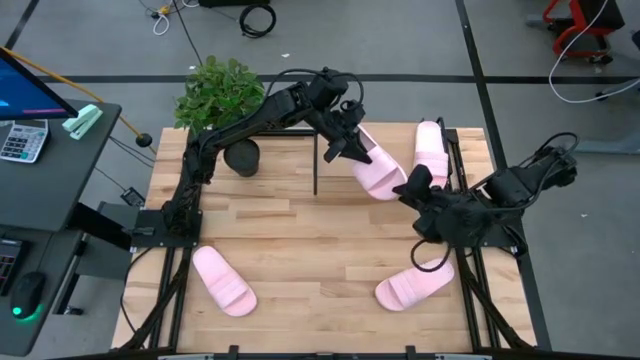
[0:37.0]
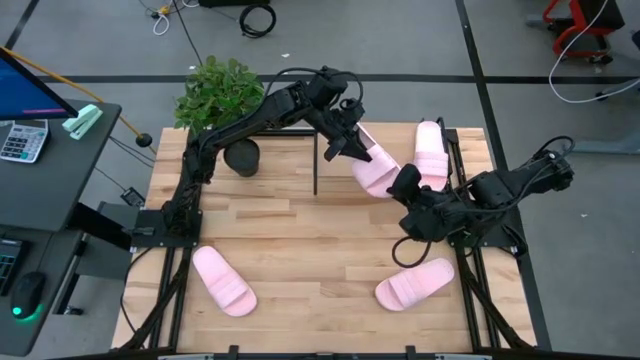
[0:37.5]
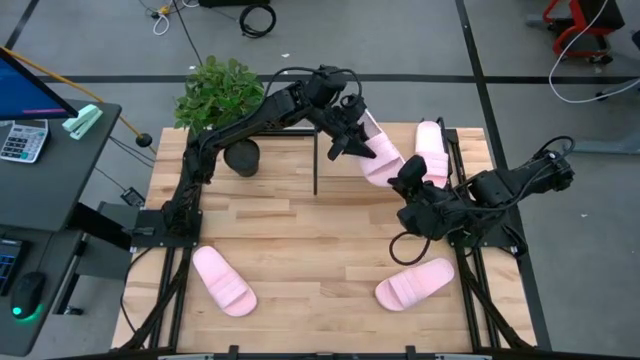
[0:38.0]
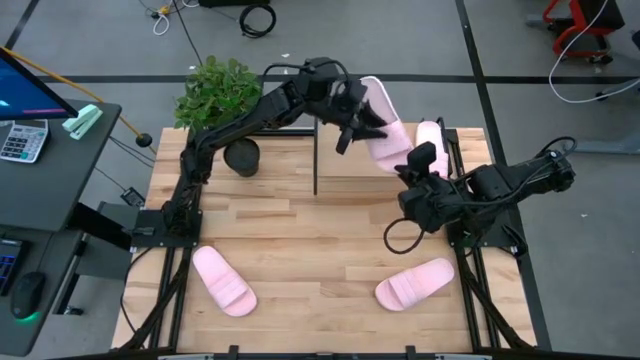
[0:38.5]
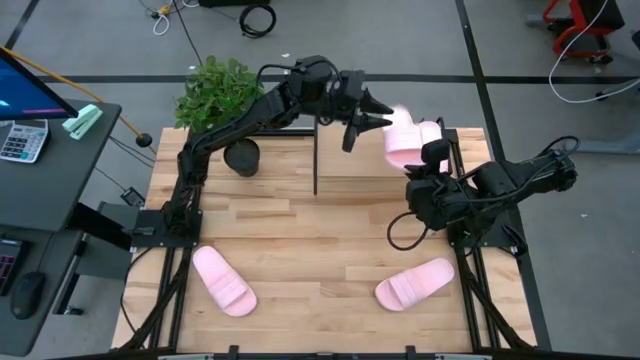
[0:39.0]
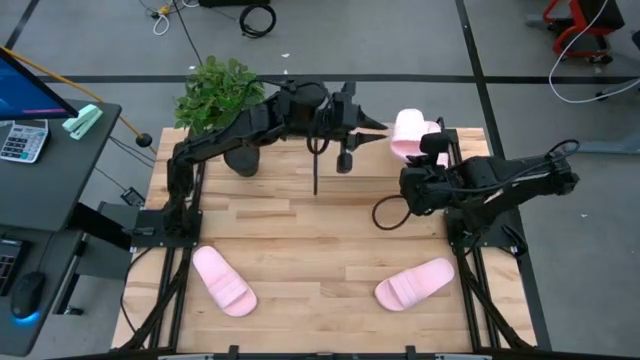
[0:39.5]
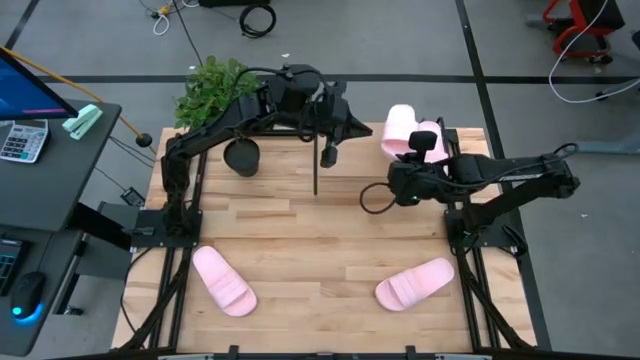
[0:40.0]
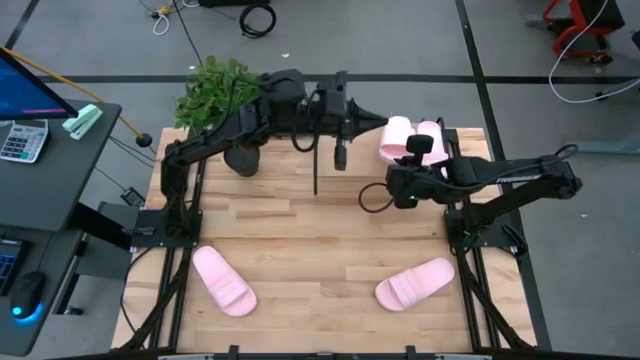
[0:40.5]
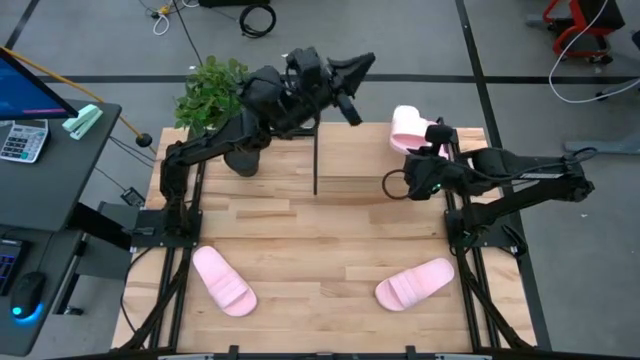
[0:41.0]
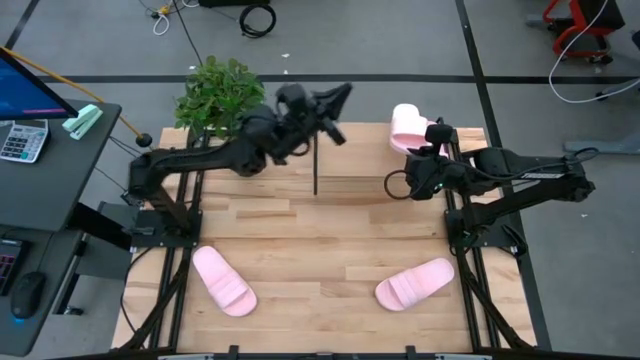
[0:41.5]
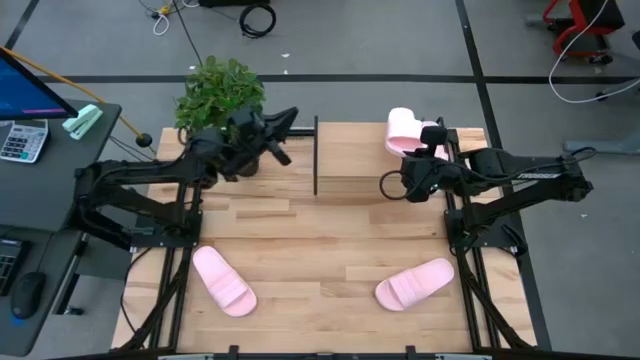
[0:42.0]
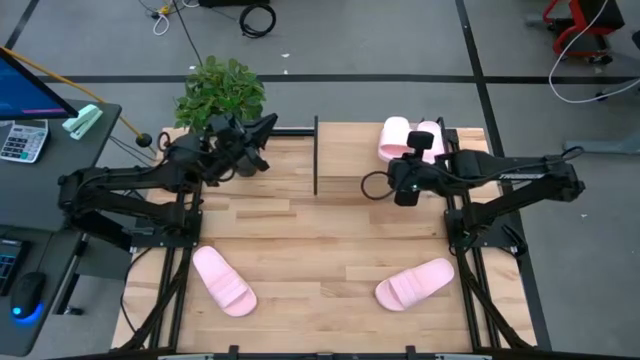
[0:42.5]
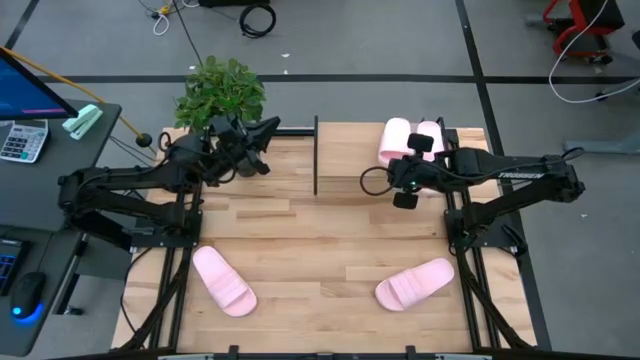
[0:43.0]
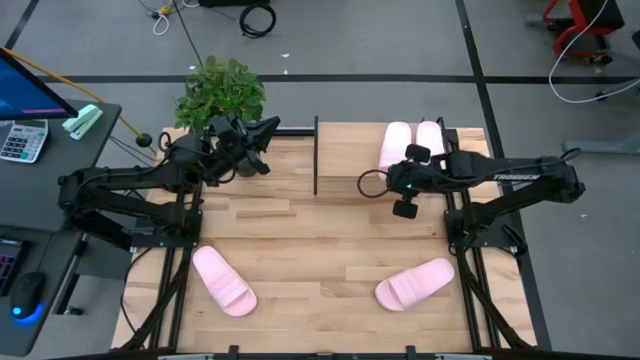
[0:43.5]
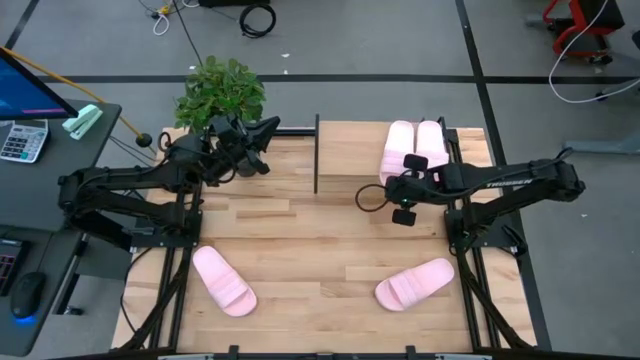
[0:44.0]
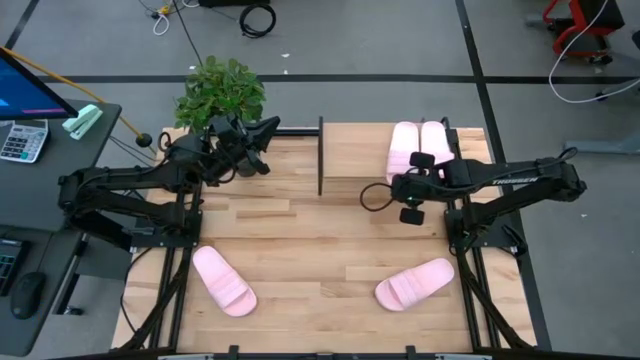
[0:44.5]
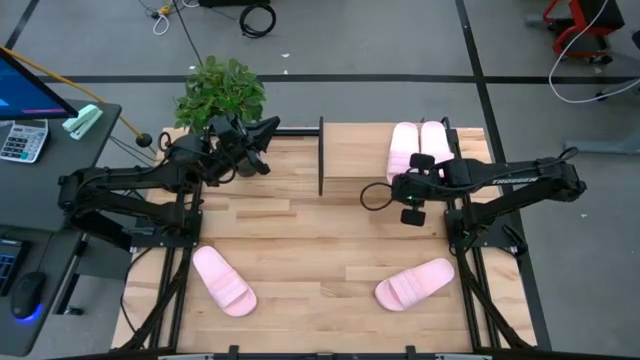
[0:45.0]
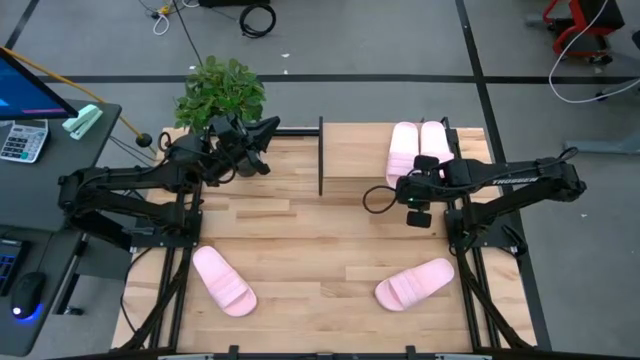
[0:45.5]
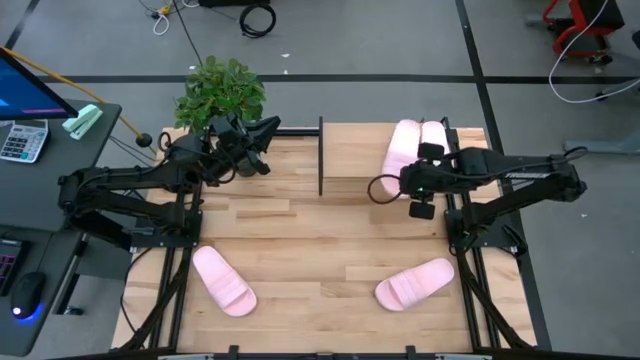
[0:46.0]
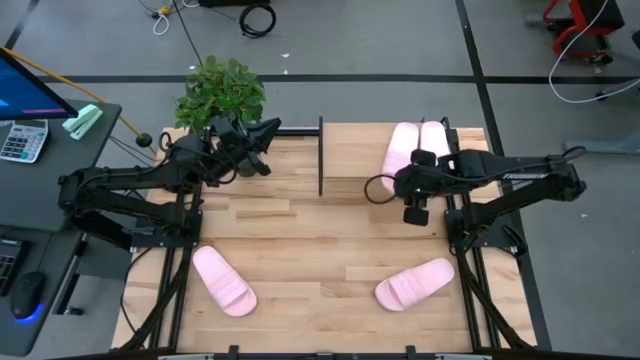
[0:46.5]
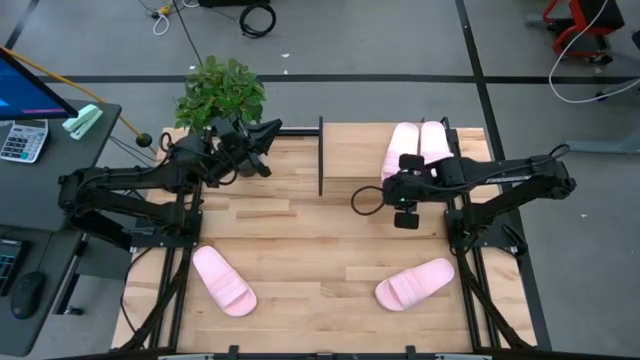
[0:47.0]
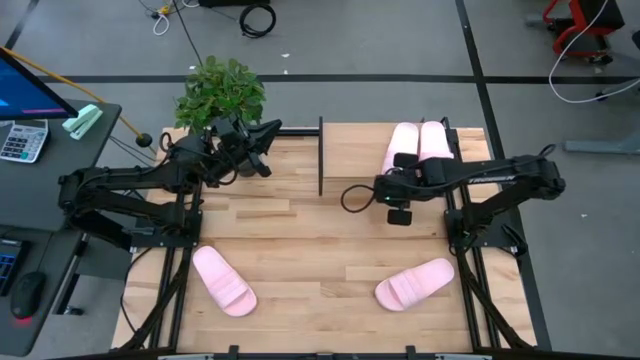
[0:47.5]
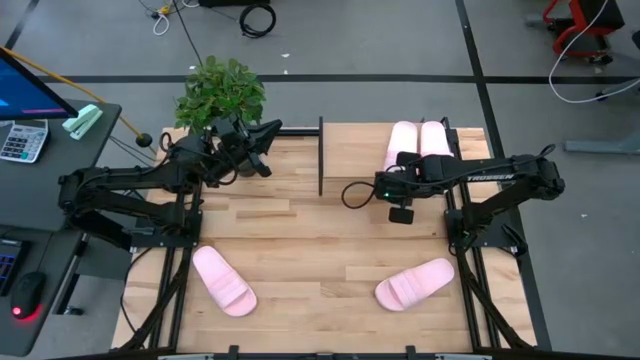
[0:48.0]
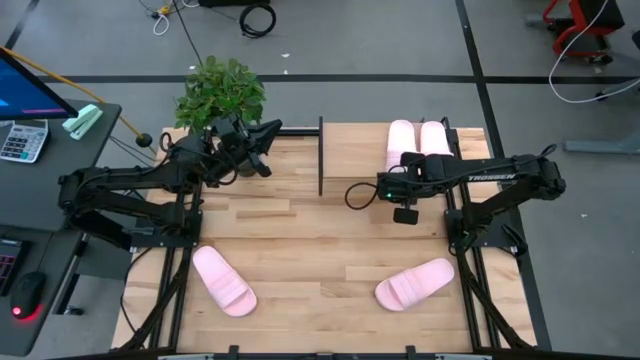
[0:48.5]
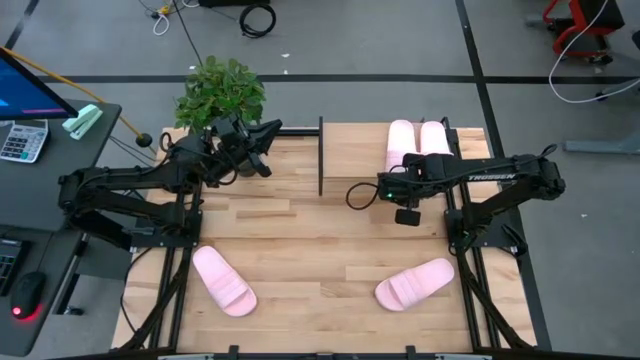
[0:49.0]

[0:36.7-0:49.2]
Task: Pick and place slides into the shelf
Put the middle pink slide on the shelf

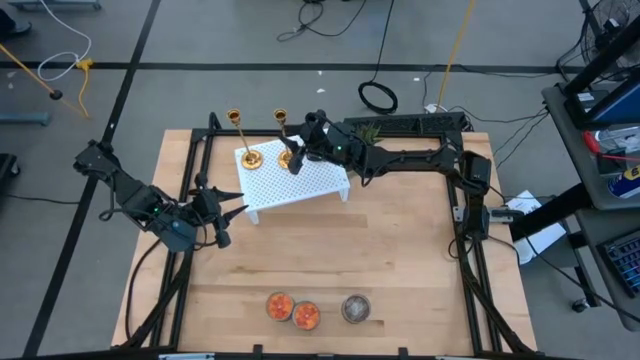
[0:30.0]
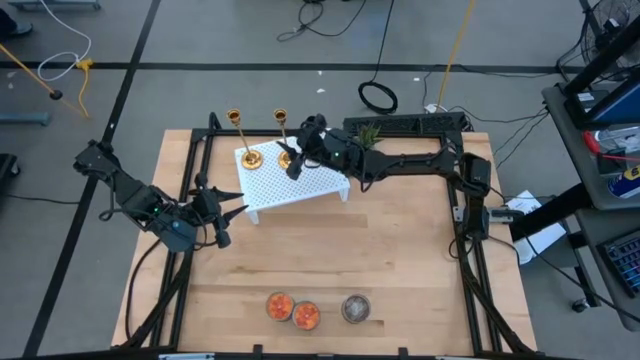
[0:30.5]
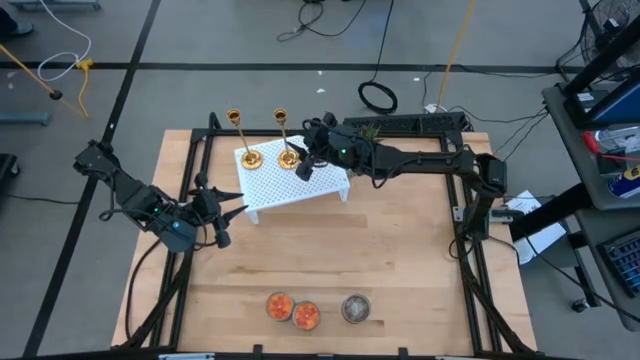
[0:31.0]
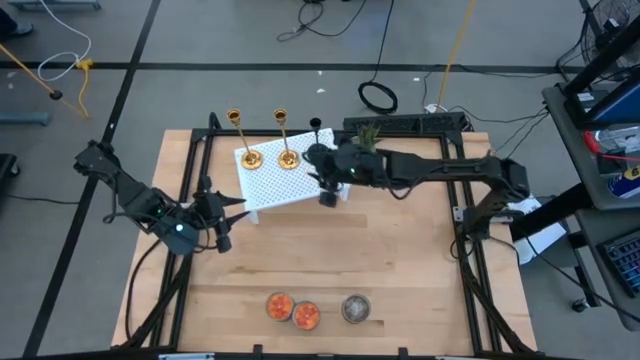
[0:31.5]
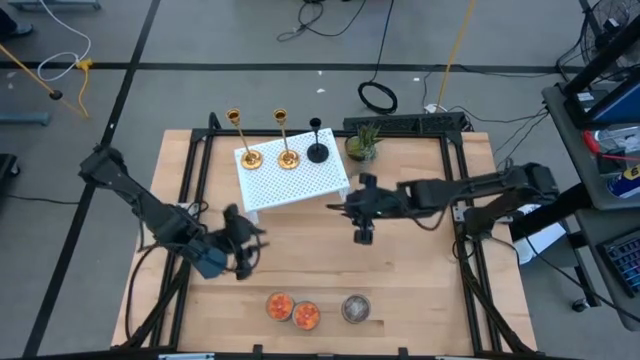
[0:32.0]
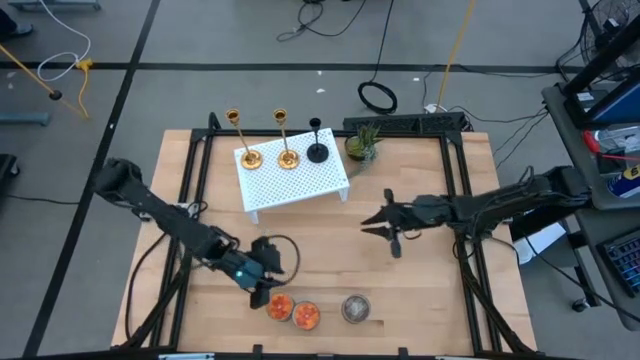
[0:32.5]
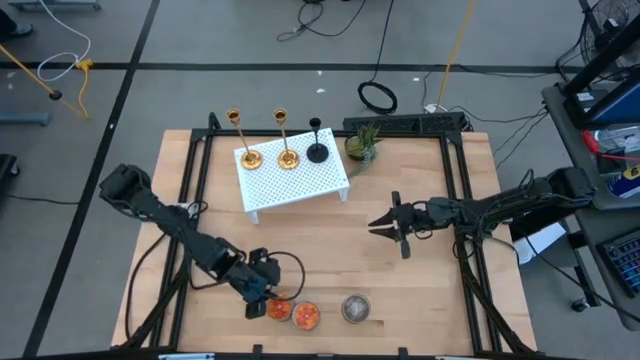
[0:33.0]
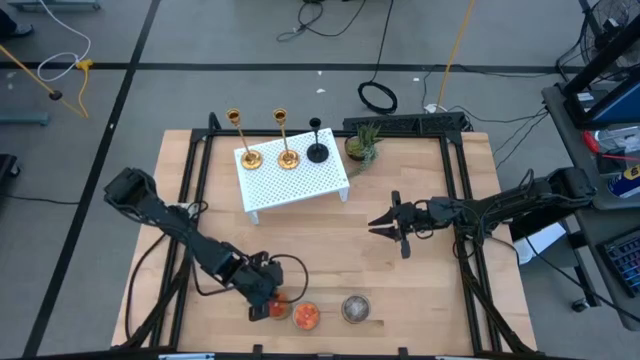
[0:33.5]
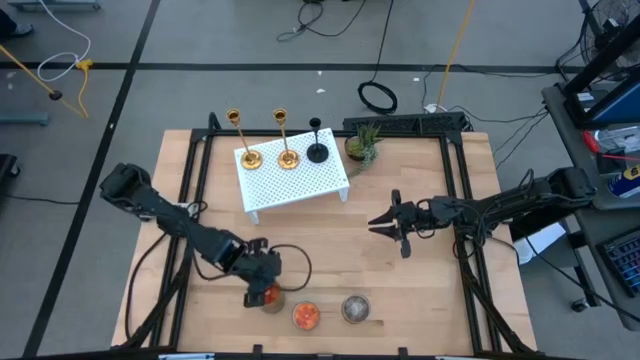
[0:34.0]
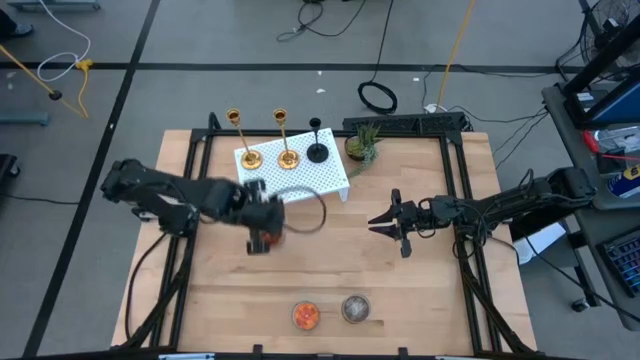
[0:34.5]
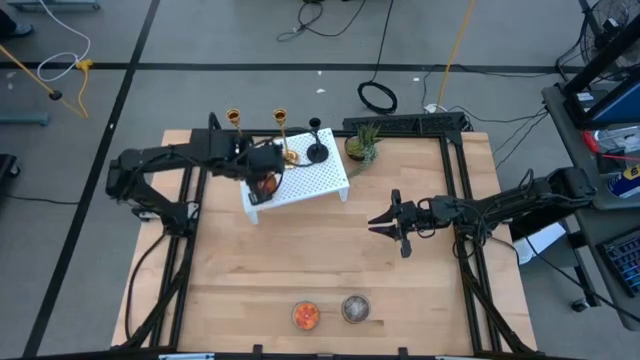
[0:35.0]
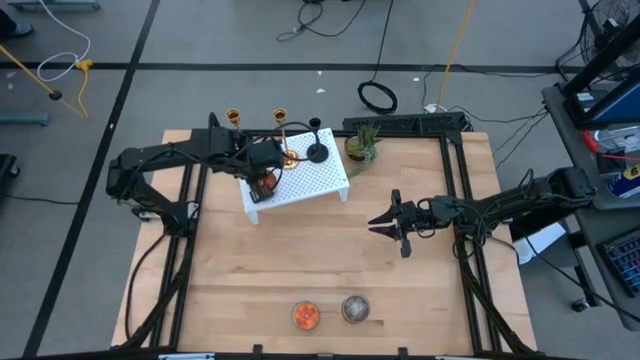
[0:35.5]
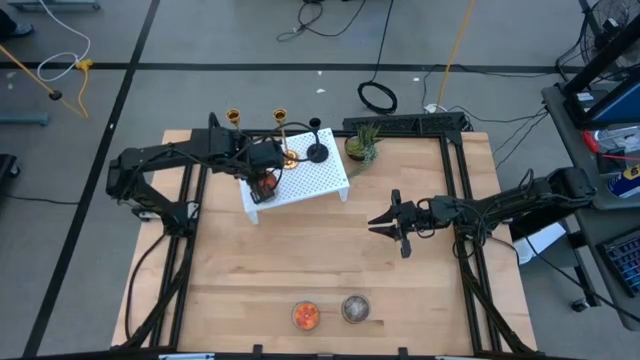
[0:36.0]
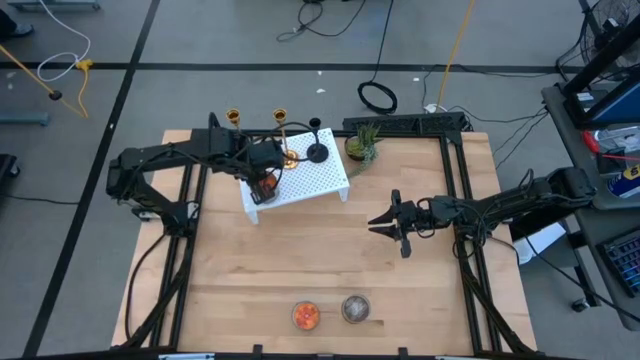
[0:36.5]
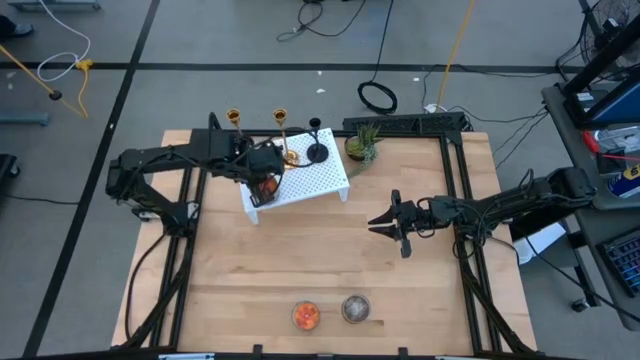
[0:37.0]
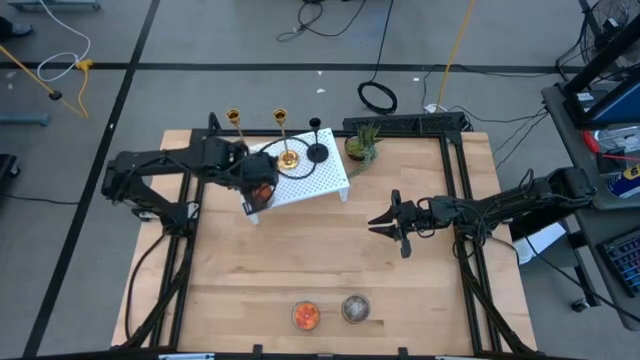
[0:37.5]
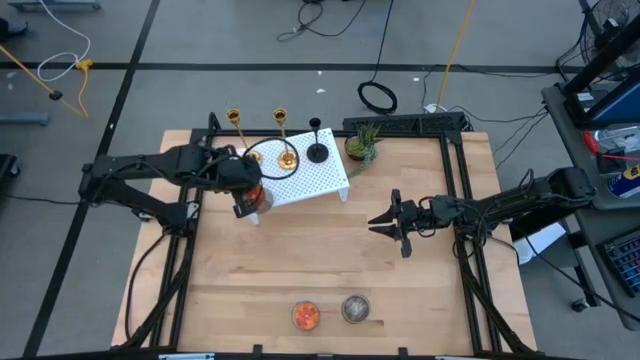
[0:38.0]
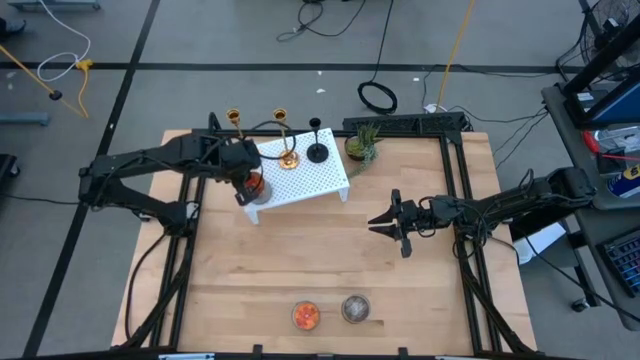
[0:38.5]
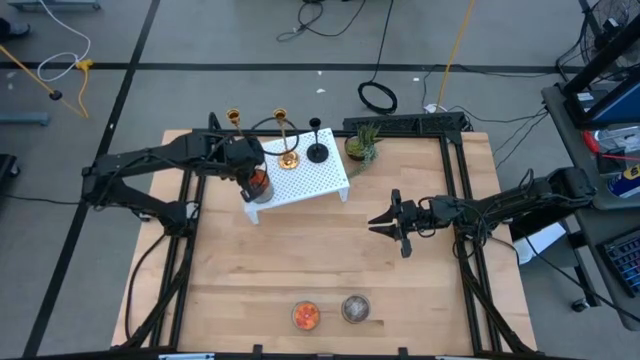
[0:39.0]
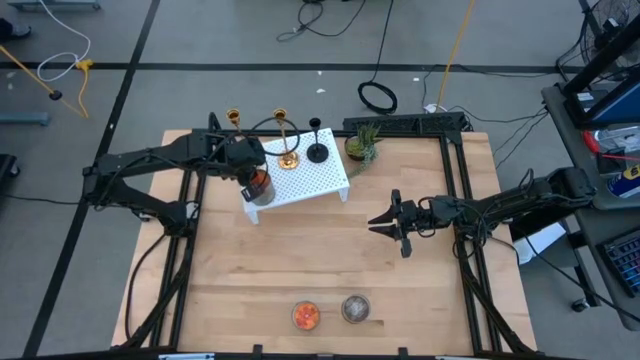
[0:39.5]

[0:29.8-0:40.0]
Task: Pick & Place candle stick holders
Put the left orange scented candle on the shelf
